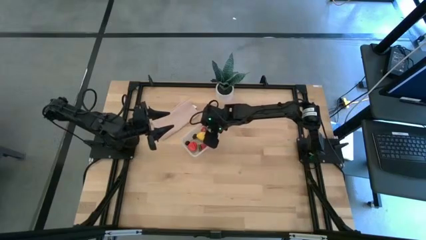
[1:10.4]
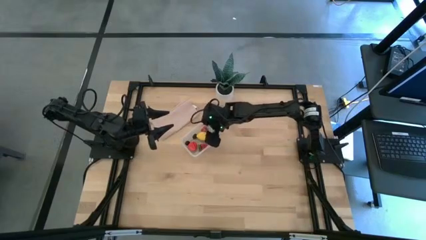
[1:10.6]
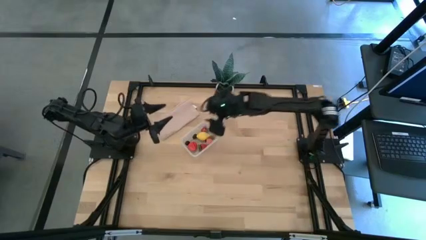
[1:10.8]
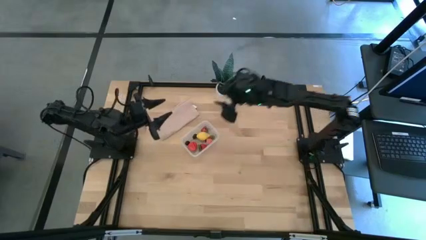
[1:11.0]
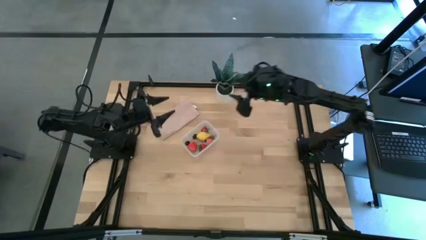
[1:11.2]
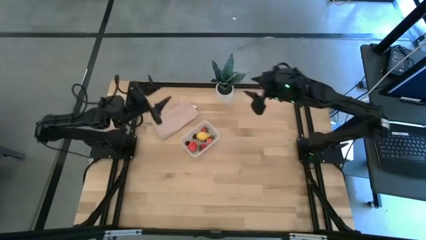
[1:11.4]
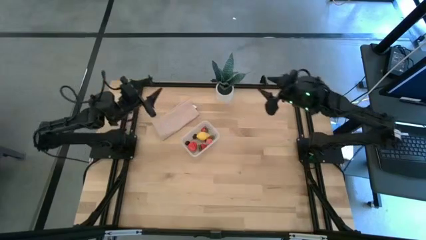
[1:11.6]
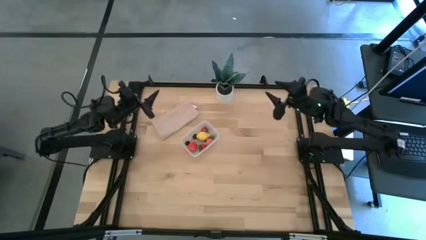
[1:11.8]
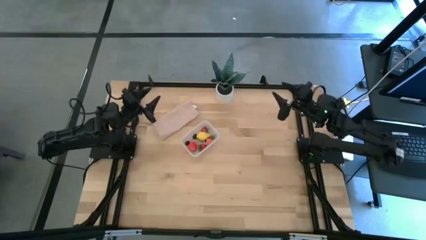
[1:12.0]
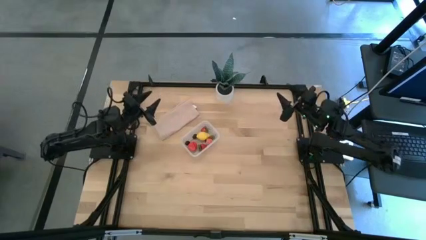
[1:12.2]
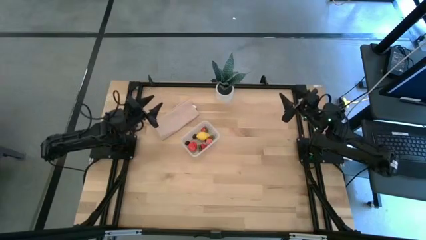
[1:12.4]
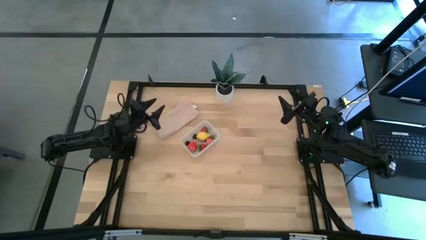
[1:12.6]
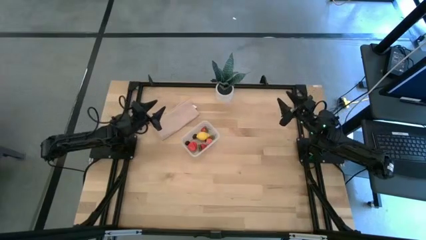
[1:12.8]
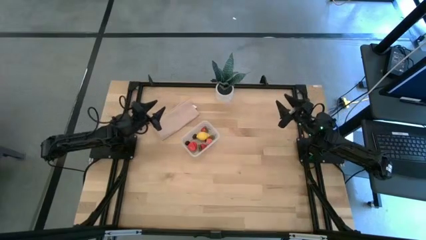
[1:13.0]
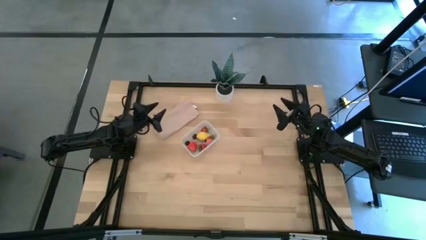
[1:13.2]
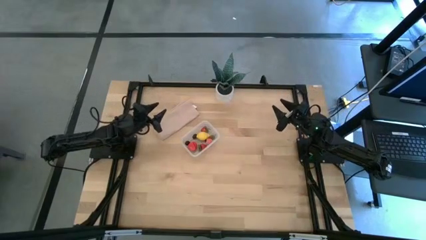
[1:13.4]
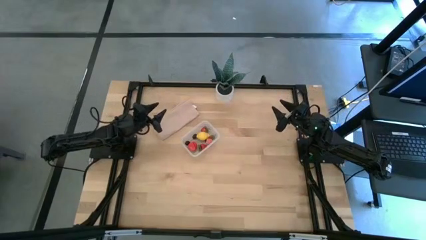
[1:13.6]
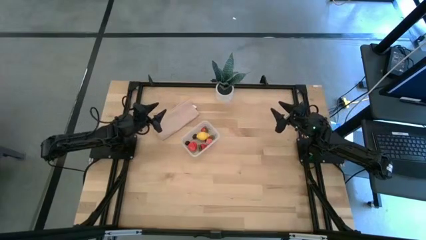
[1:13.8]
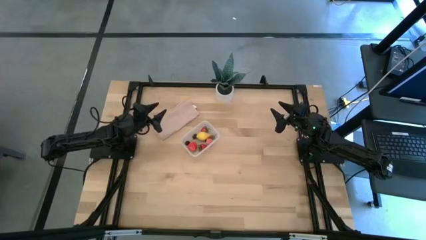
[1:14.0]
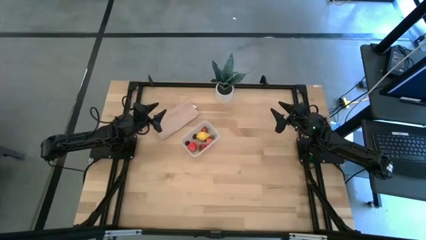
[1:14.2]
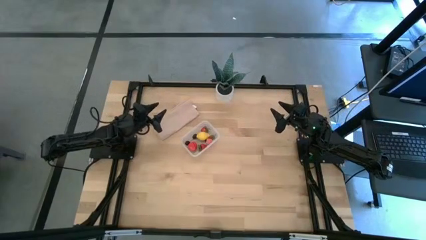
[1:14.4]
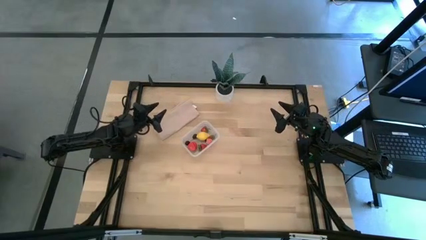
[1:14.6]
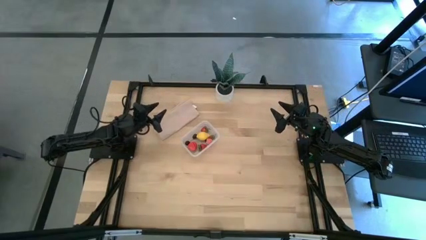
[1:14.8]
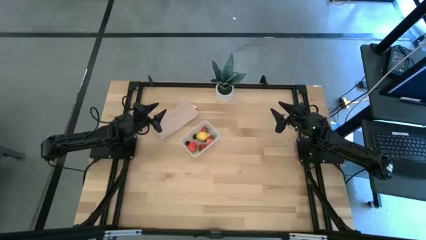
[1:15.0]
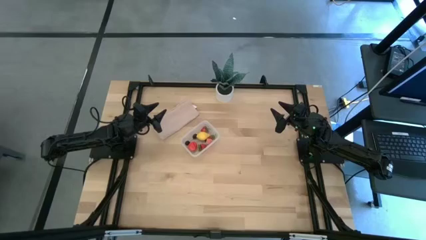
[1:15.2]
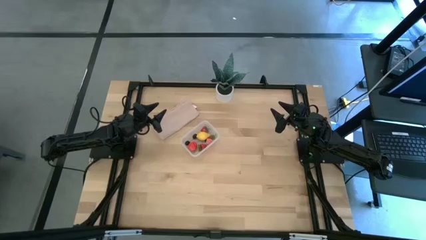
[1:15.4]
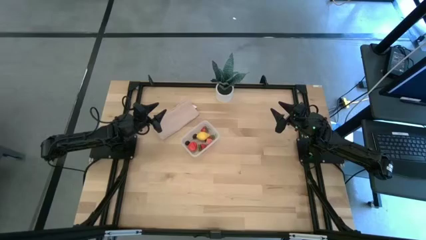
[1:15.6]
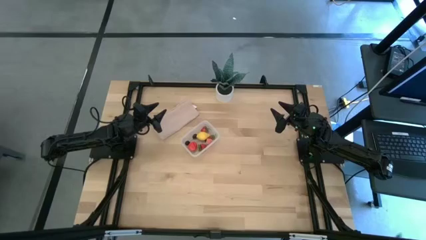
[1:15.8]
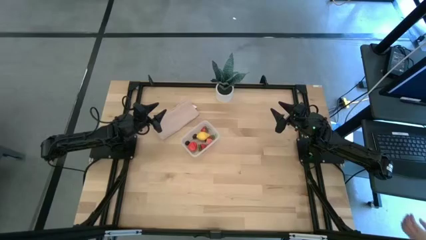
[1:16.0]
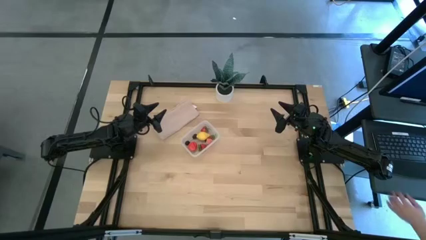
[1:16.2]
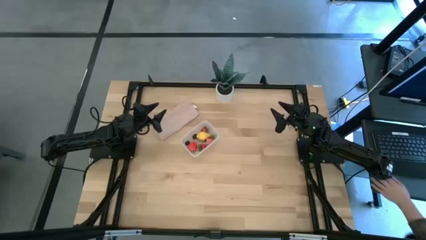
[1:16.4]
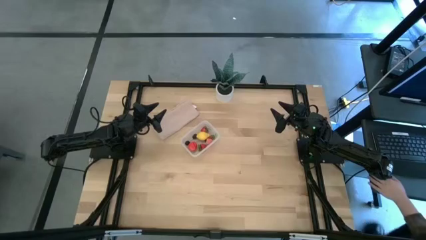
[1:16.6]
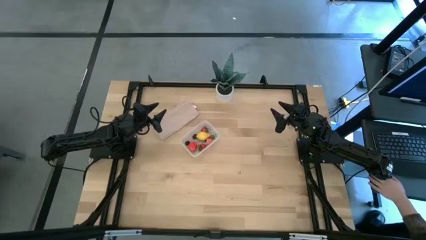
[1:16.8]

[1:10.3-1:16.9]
Task: Pick and placing Produce into tupperware
Return to Home Position

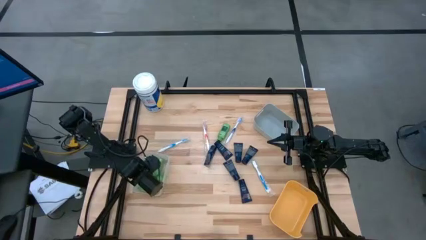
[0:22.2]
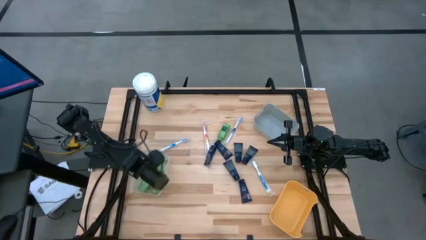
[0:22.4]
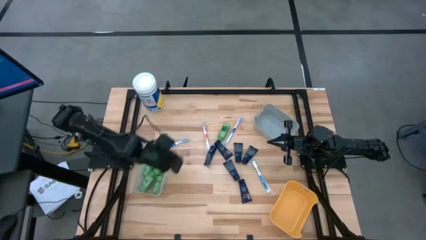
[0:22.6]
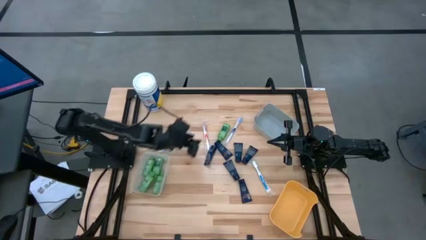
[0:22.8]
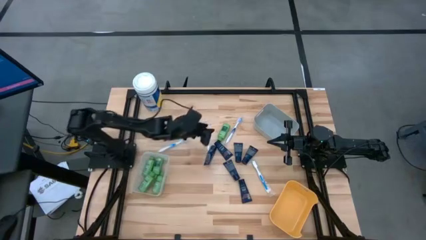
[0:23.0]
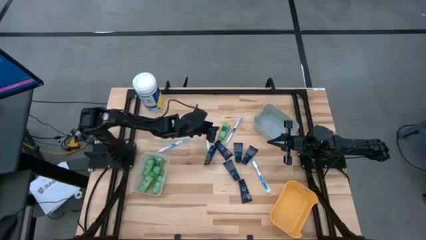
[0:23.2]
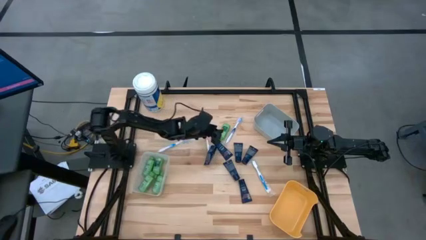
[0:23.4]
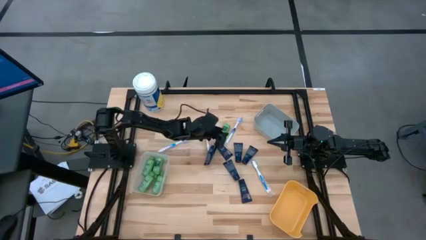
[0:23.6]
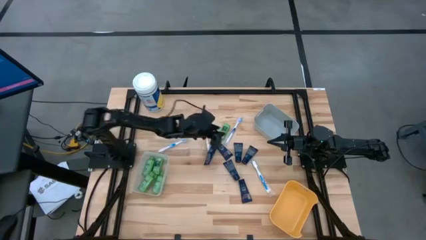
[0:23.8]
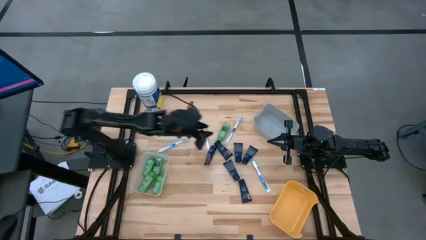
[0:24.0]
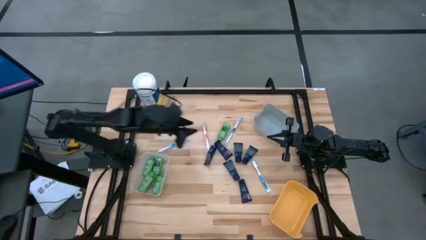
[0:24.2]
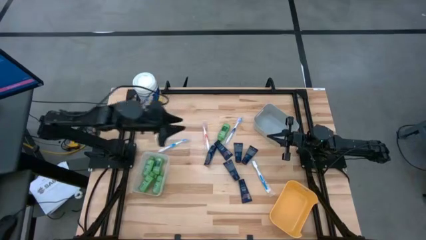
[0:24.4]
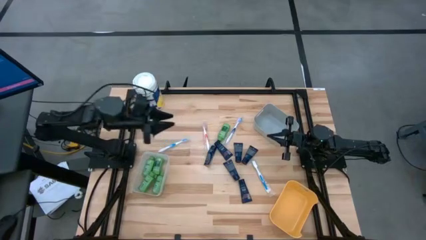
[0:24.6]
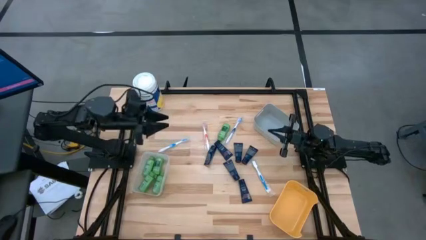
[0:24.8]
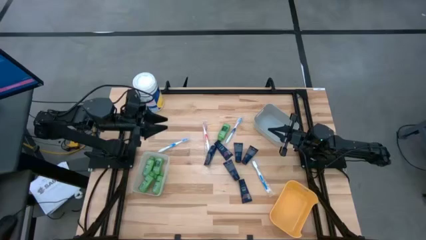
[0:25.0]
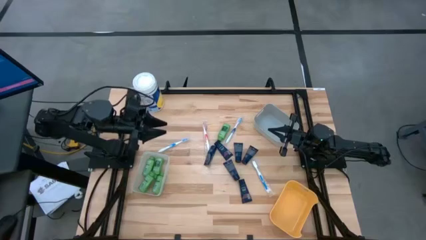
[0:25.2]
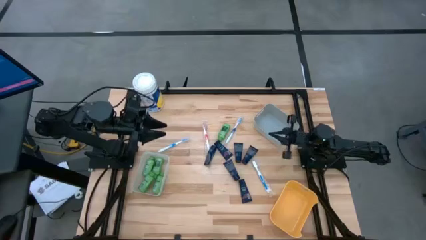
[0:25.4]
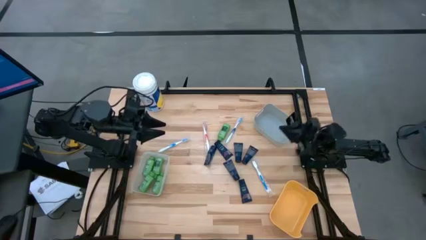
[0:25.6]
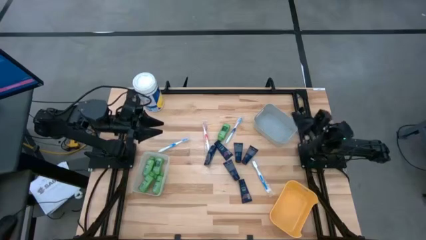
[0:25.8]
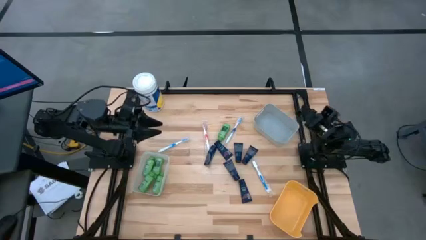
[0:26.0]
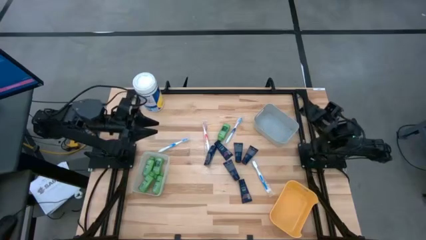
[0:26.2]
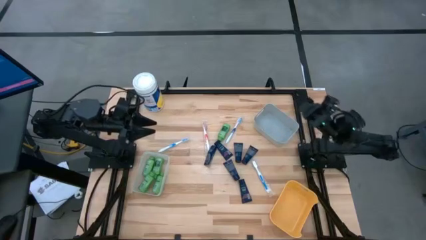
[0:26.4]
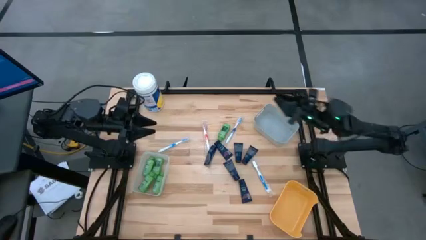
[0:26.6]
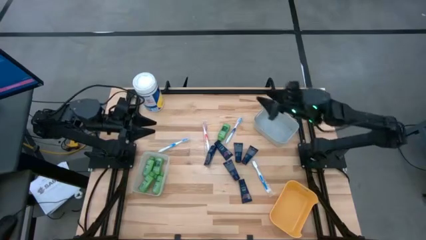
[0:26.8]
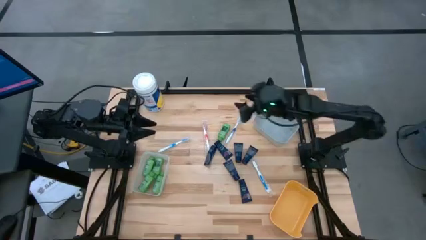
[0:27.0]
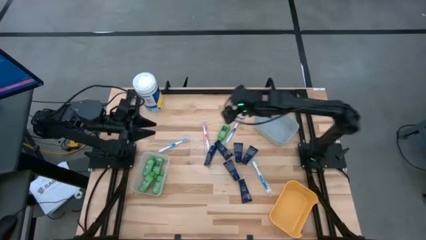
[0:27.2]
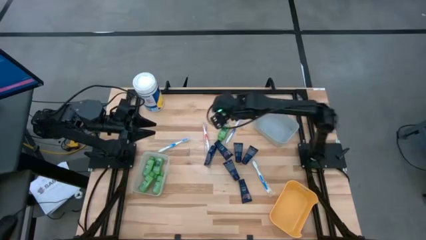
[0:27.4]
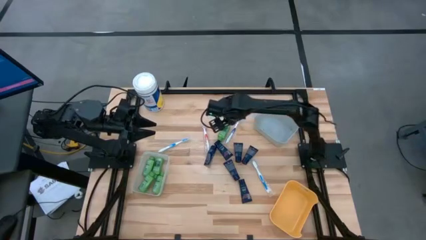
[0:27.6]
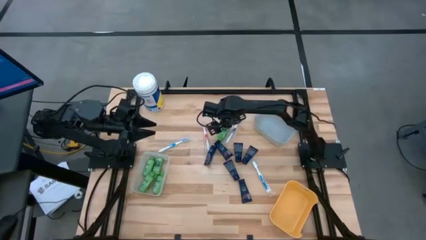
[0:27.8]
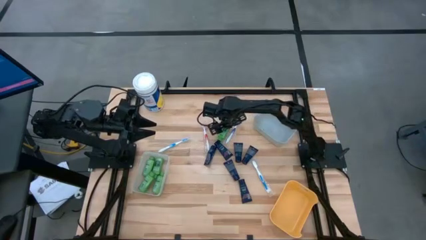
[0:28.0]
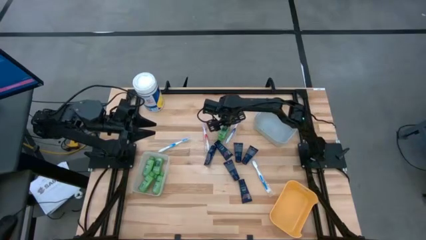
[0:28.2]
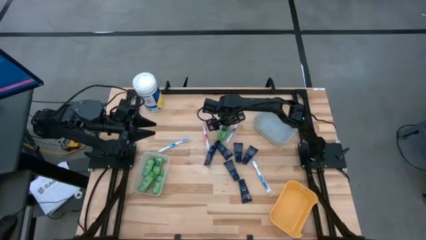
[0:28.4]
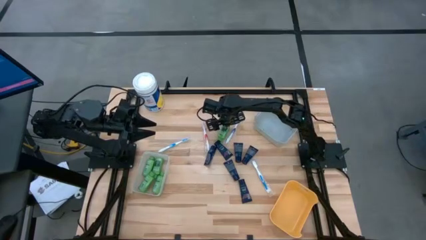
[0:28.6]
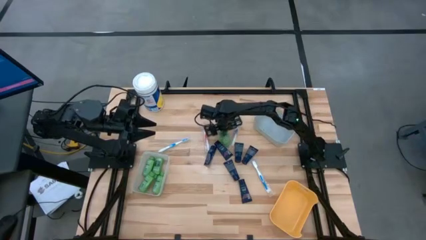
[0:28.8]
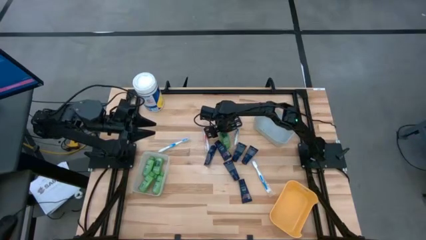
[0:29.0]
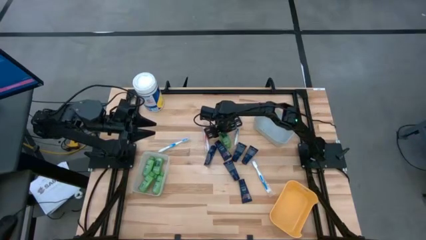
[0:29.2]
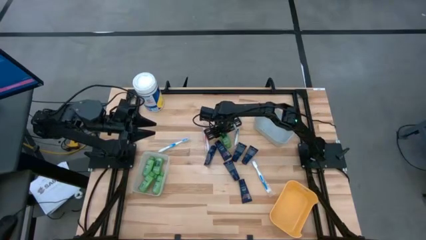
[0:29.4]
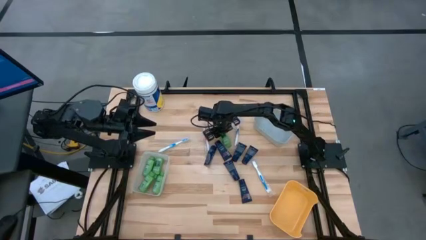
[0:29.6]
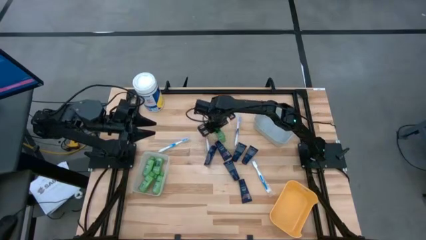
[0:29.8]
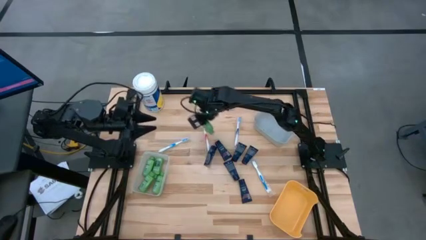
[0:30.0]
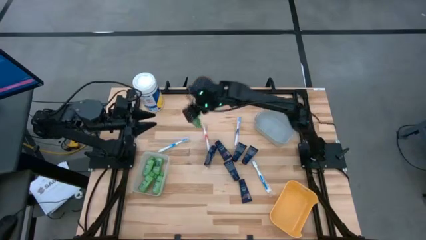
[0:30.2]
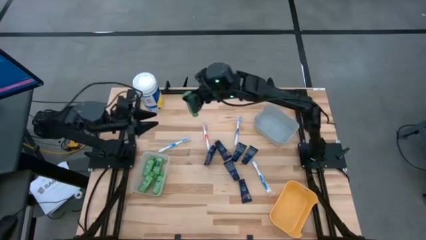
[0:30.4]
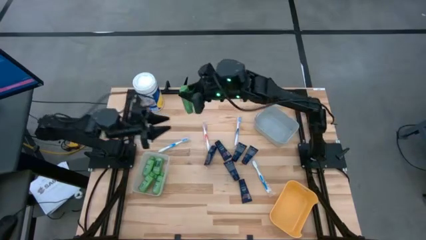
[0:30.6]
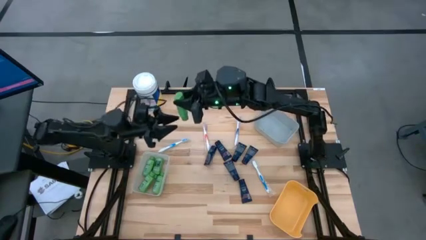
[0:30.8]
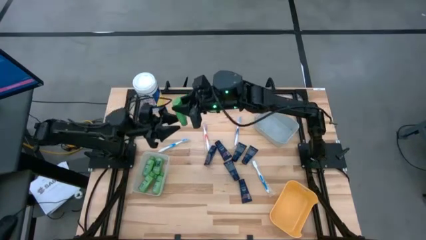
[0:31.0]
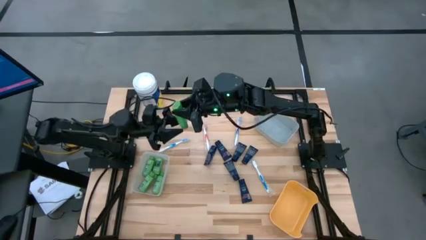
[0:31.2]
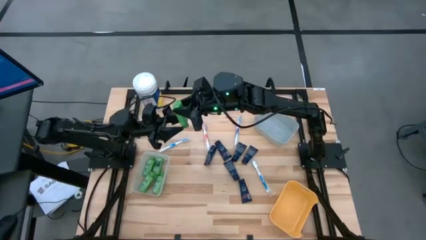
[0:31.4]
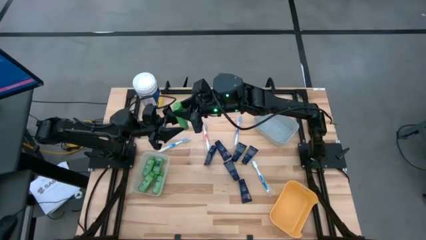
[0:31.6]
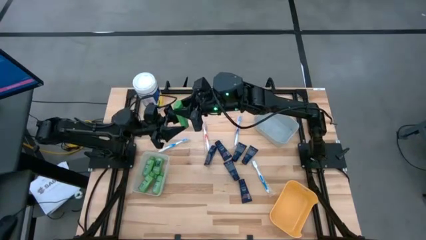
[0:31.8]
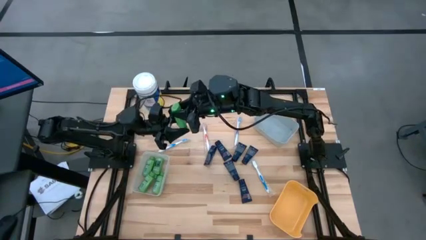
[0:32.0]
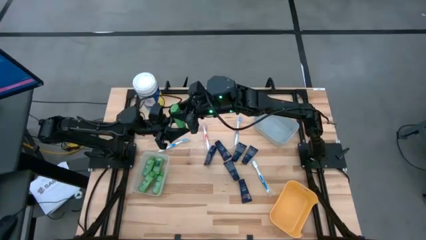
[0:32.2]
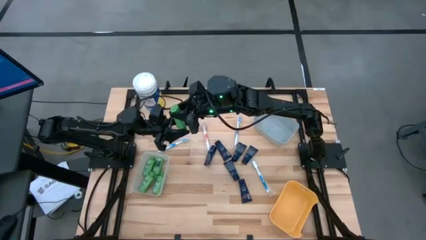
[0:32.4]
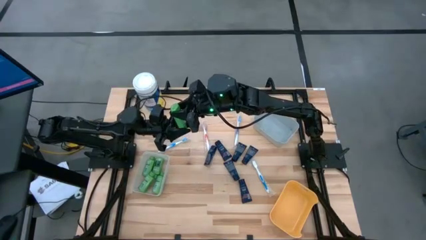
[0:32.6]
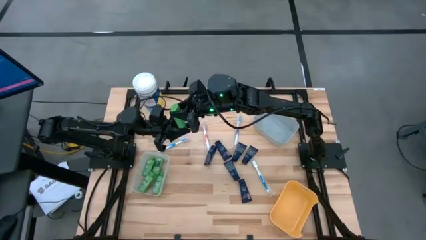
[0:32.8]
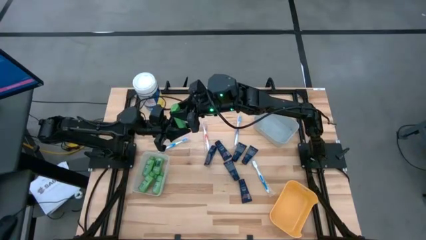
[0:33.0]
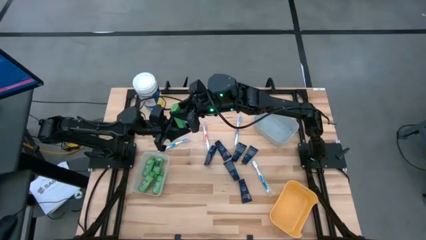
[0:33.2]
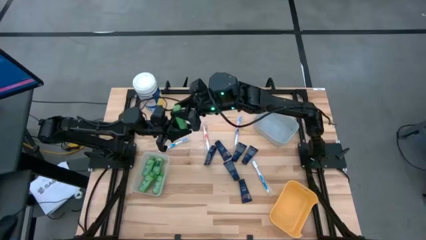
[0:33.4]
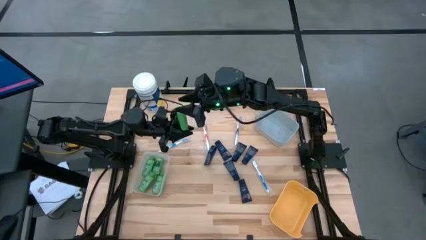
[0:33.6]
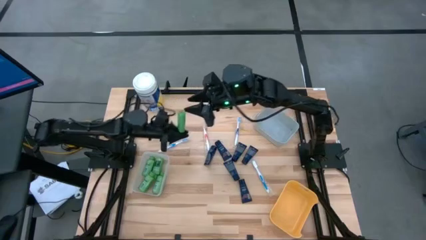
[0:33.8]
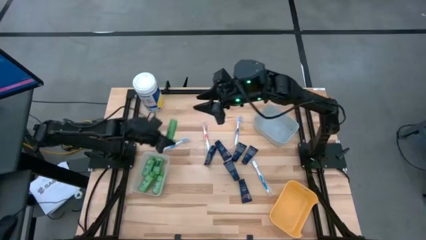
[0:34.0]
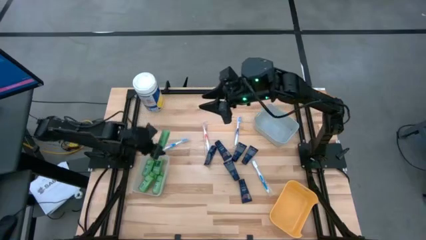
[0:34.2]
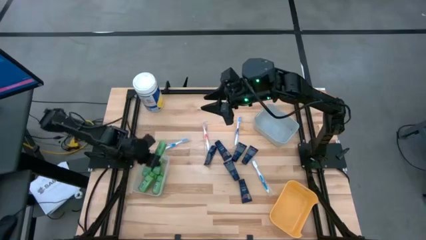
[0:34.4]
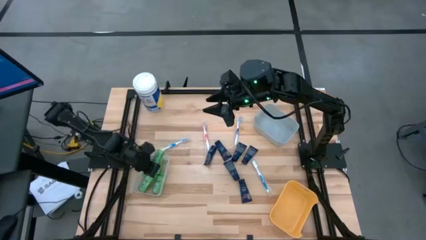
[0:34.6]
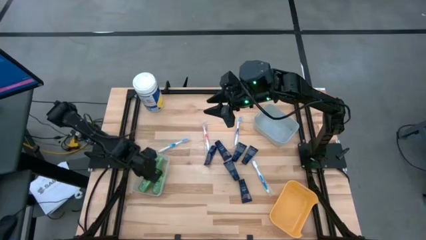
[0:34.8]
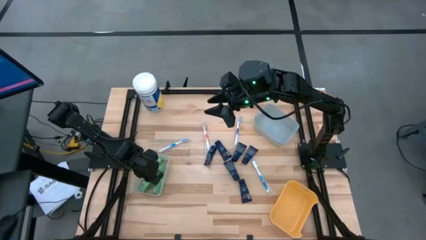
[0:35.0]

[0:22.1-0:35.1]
Task: Pick & Place Travel size toiletries
Put the green shampoo bottle into the transparent bin
